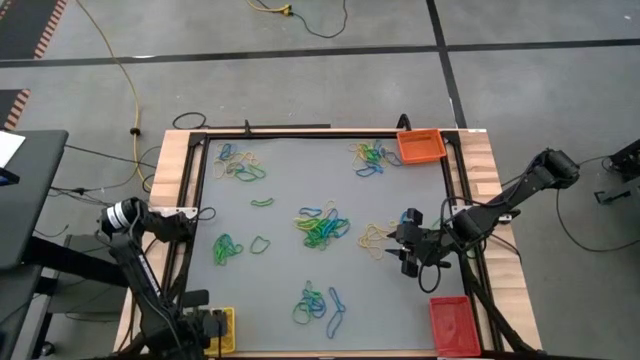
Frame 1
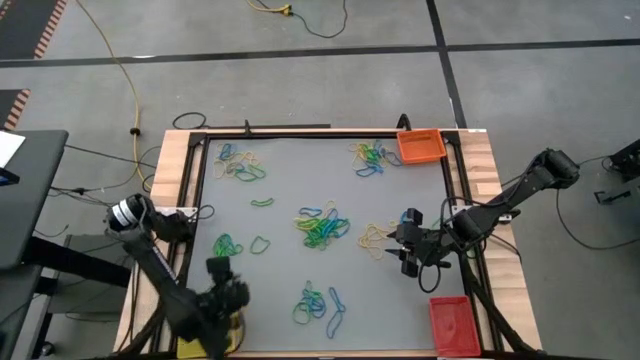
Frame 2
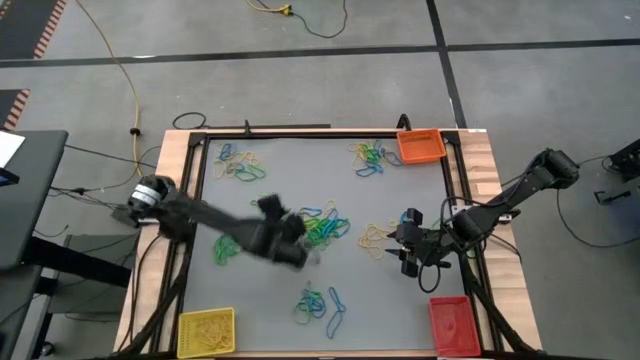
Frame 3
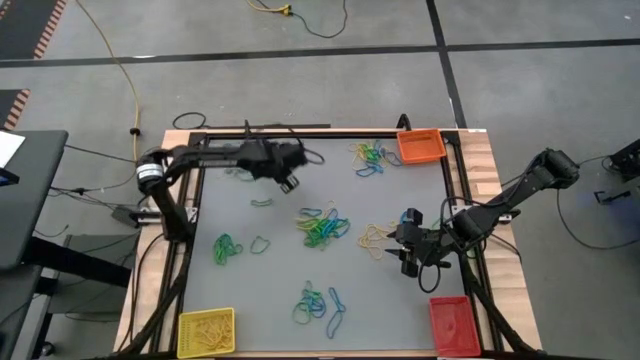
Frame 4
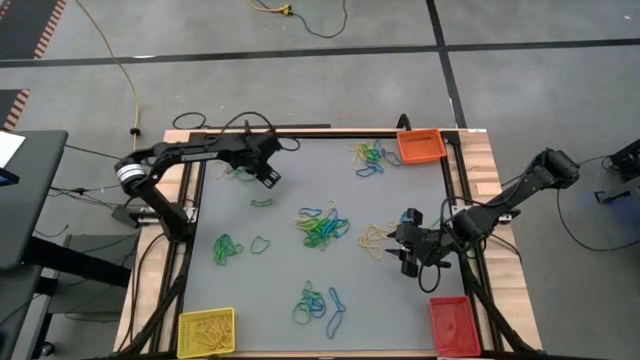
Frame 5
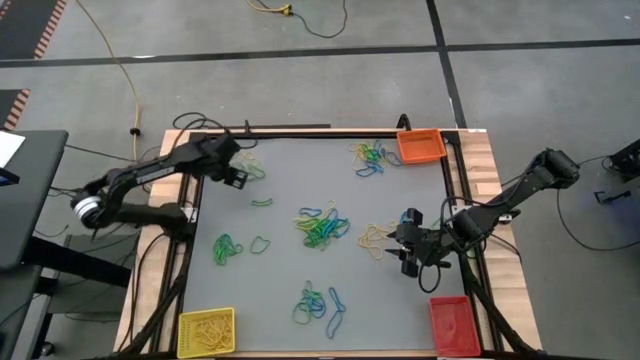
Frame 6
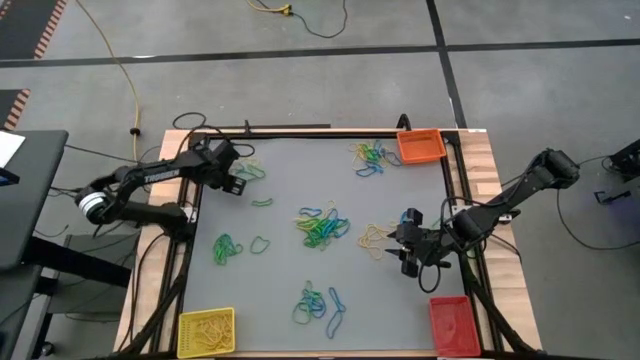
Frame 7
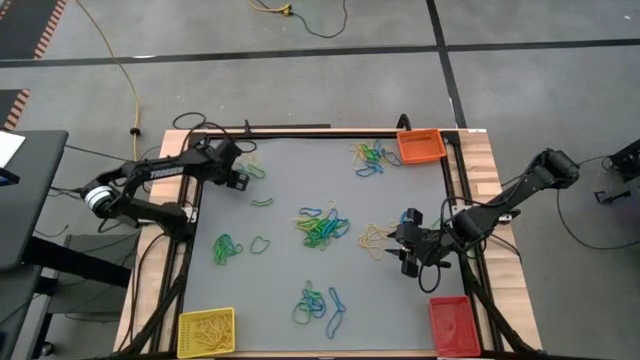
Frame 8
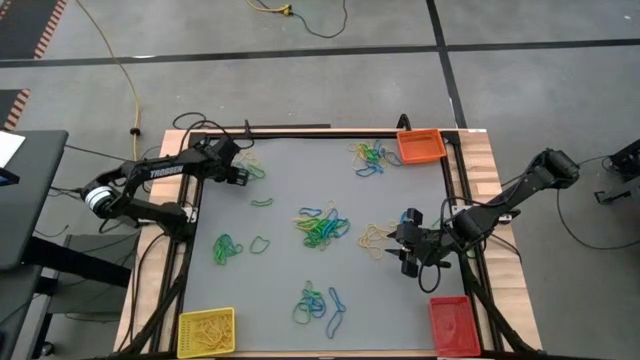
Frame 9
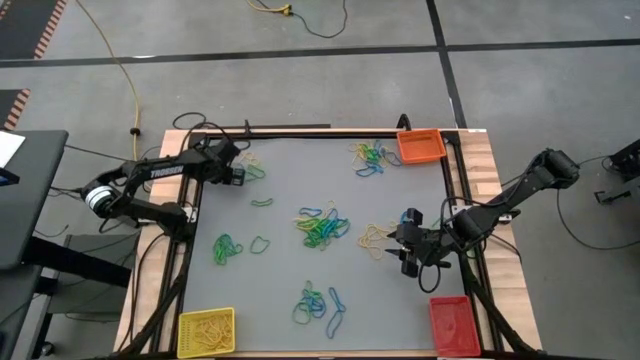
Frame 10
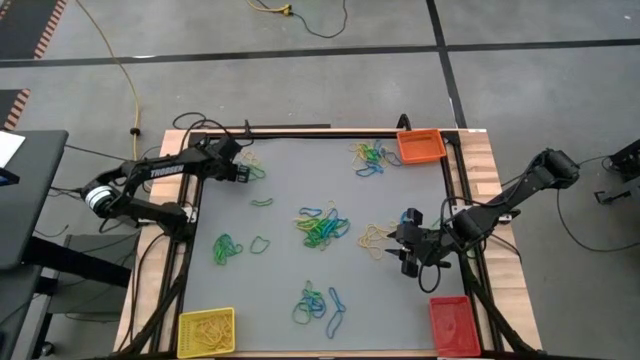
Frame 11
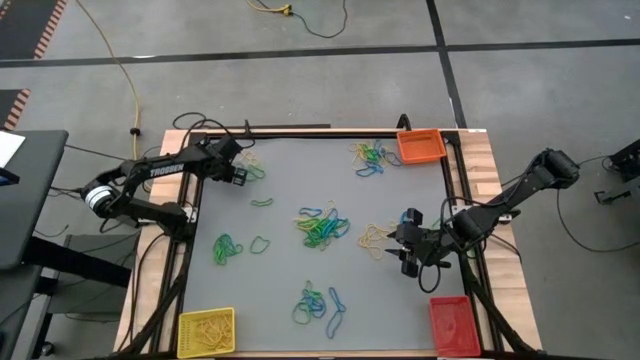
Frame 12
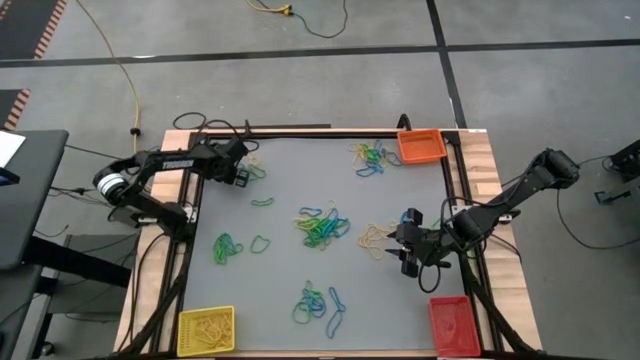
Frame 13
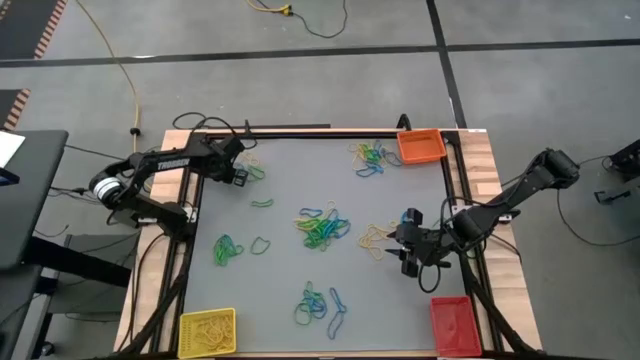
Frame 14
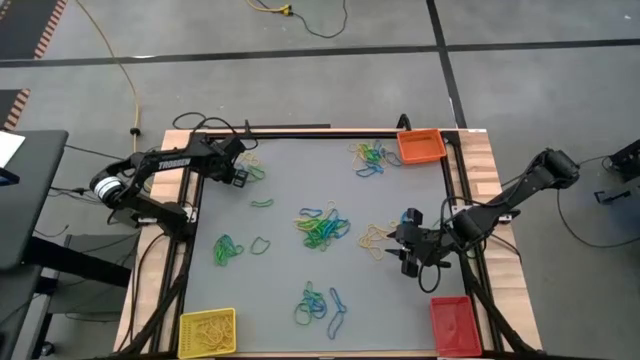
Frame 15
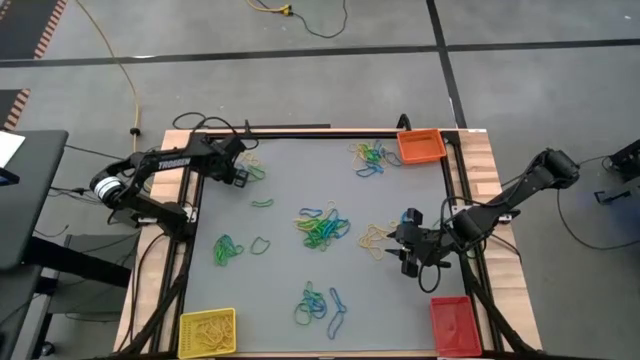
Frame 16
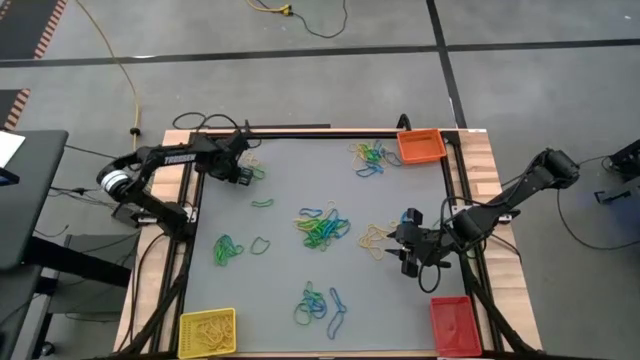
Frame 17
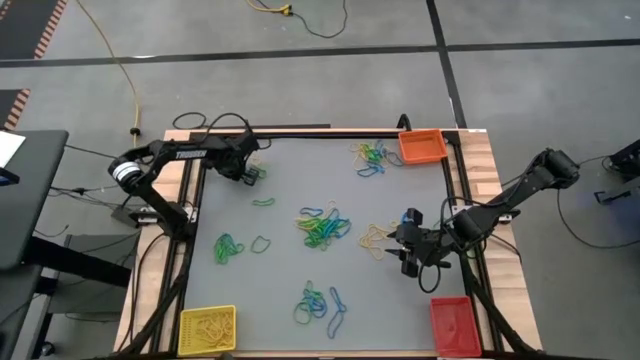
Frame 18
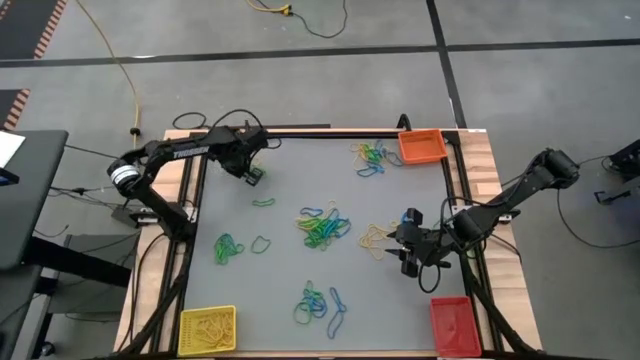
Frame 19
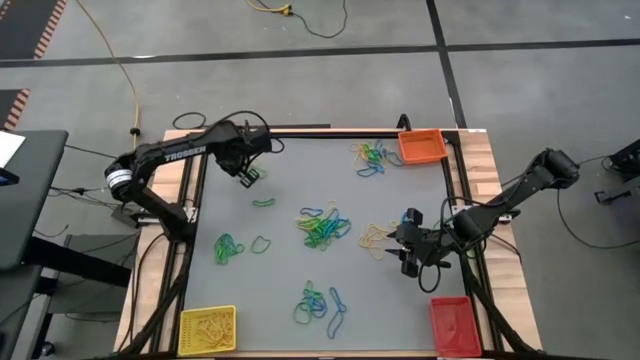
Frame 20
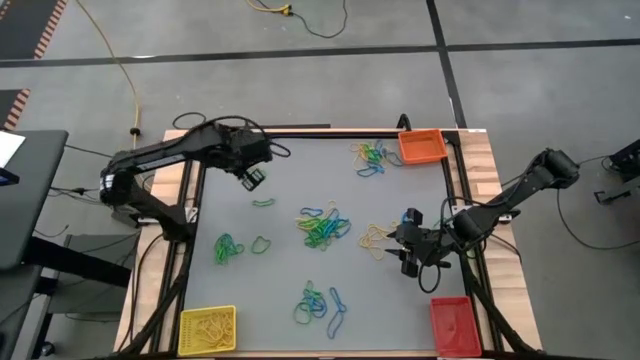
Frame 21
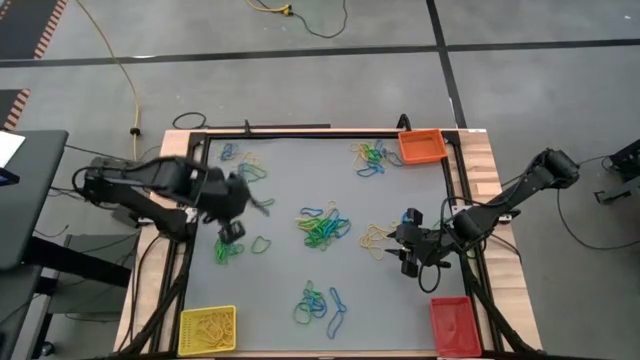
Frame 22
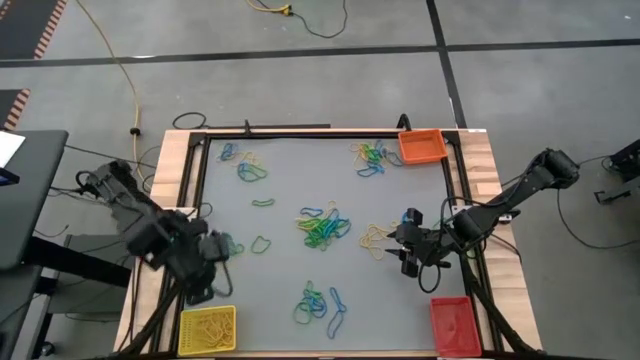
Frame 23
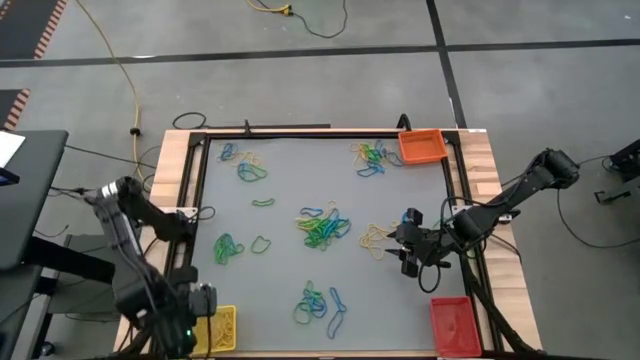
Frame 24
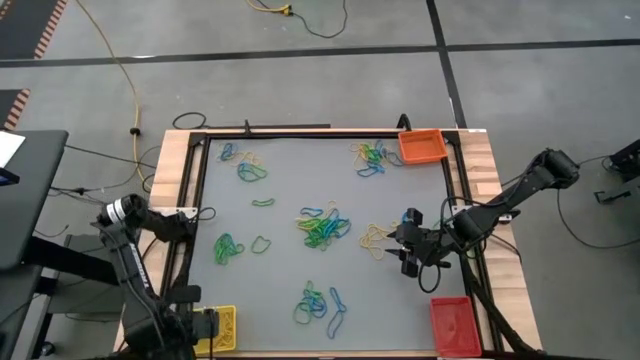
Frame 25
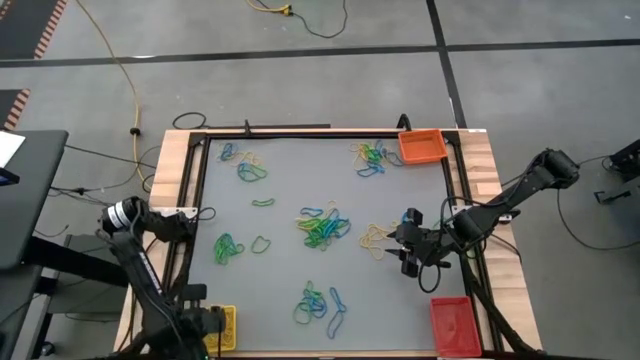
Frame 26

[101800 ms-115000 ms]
Task: Sort rubber bands into baskets
Put the yellow rubber band into the yellow bin

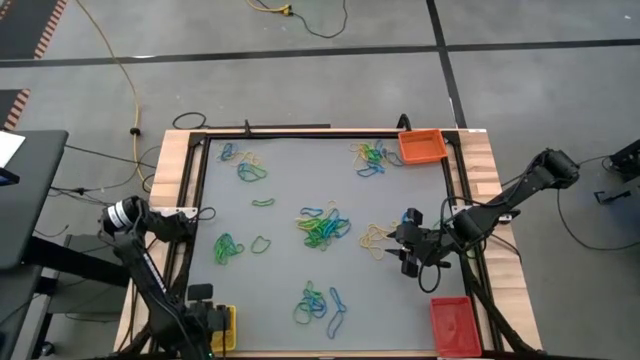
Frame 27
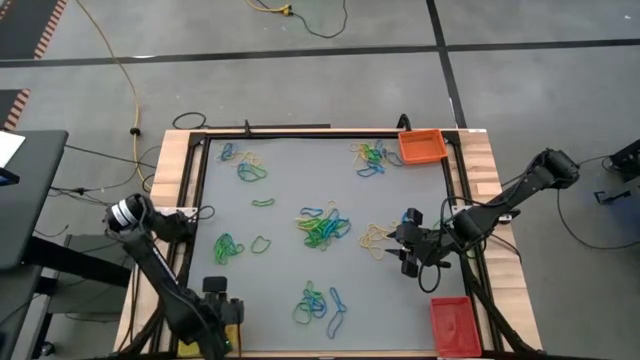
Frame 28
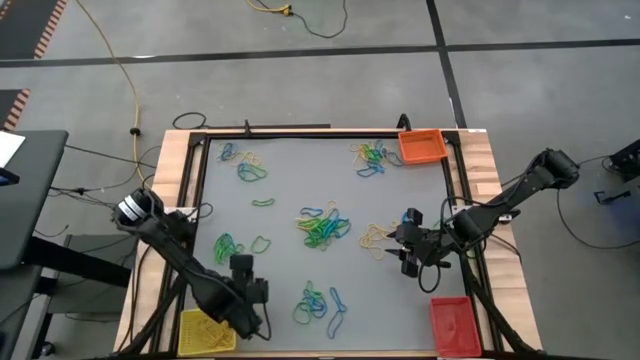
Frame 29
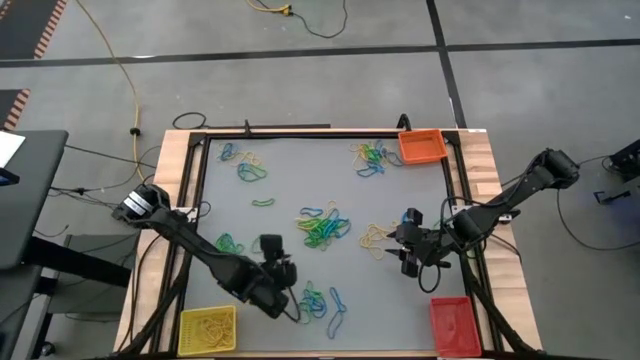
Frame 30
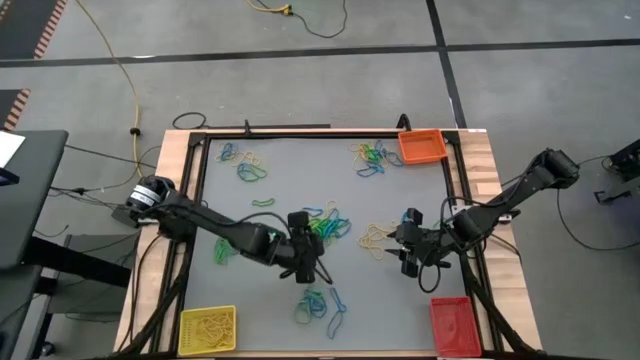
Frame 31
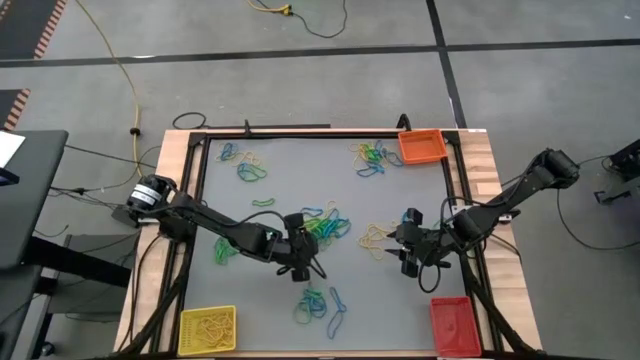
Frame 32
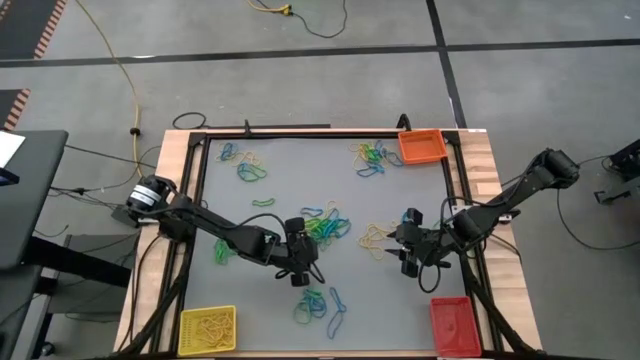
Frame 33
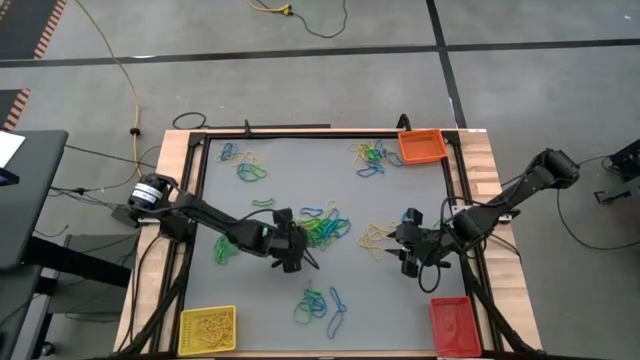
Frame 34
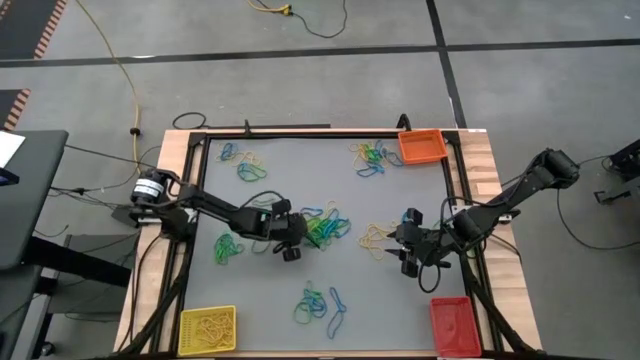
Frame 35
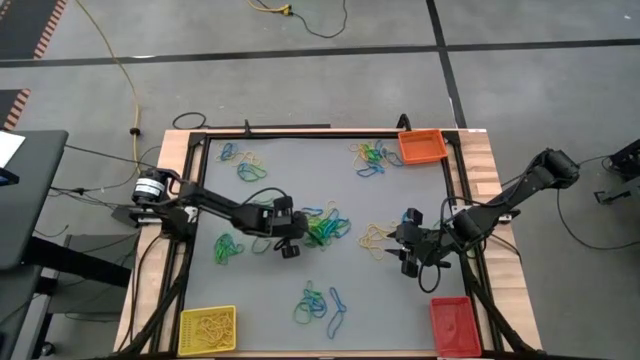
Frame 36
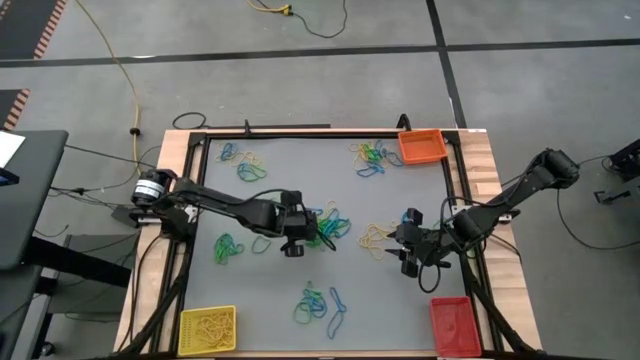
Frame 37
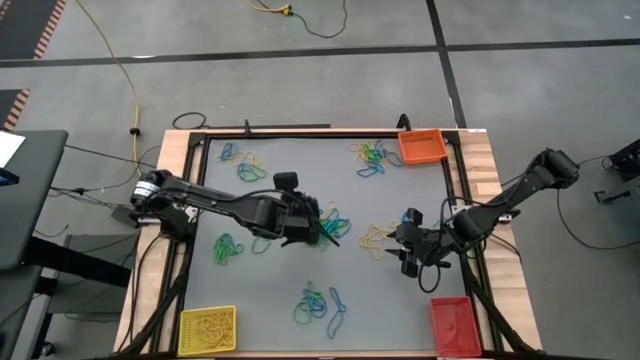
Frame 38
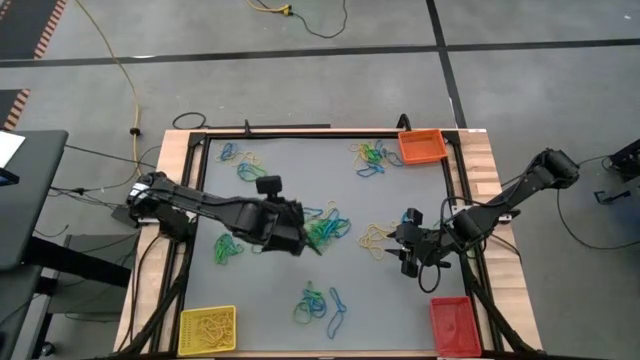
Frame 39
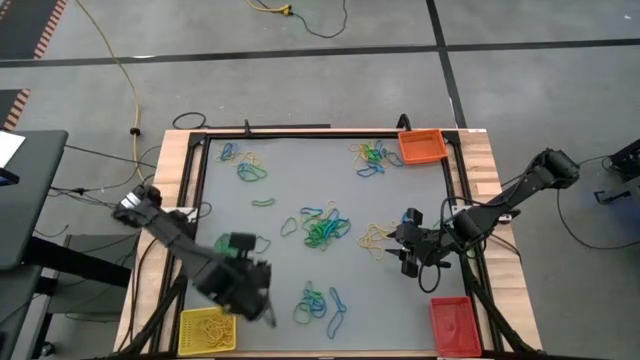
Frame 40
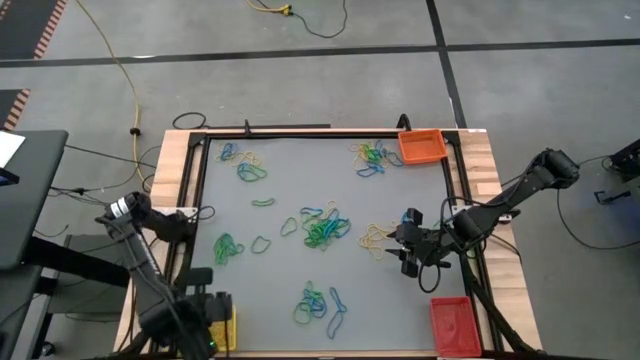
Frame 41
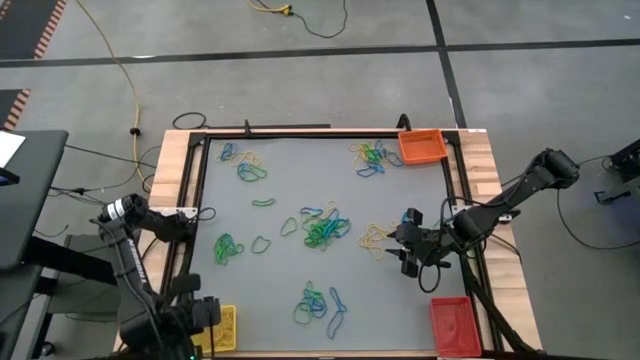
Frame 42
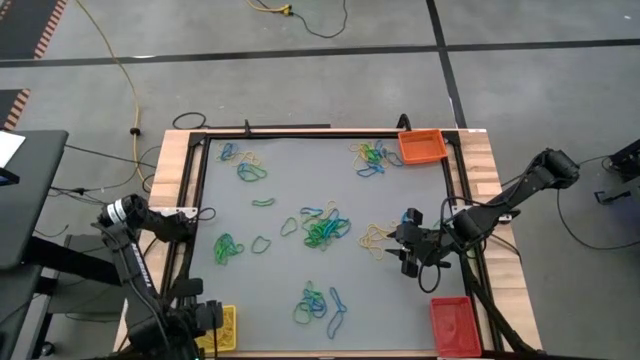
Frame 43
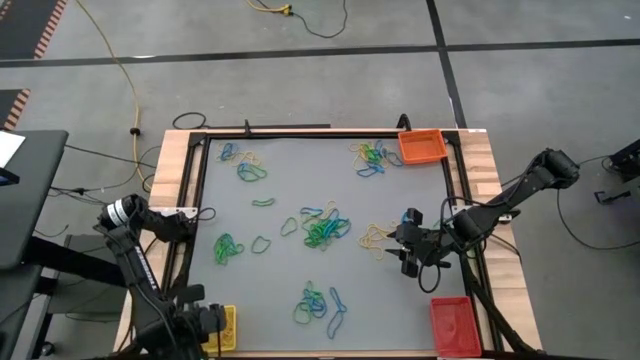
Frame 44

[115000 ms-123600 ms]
Put the yellow rubber band into the yellow bin
